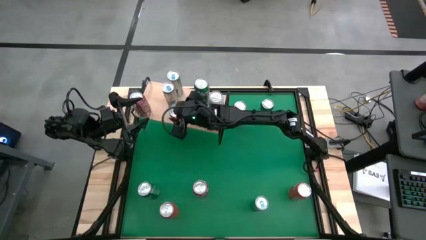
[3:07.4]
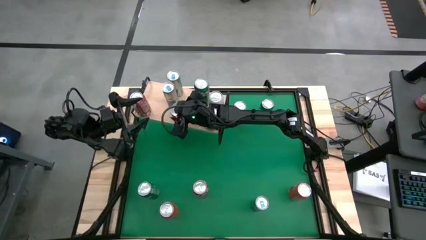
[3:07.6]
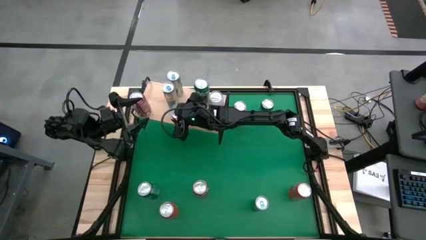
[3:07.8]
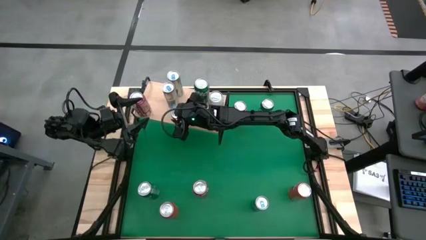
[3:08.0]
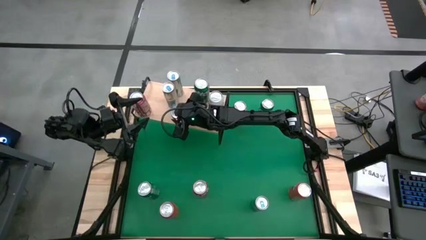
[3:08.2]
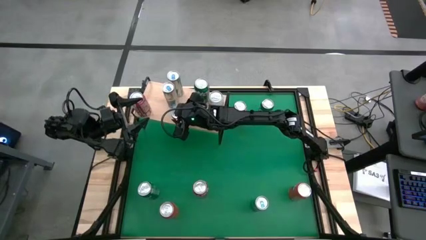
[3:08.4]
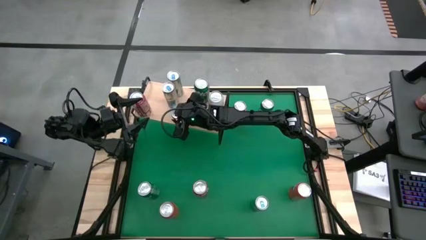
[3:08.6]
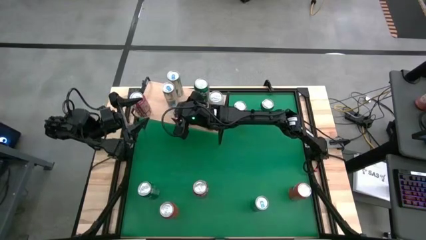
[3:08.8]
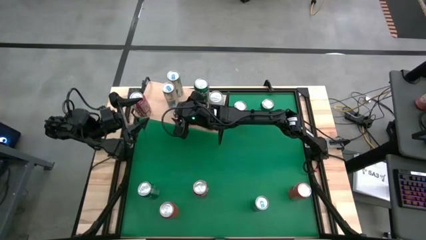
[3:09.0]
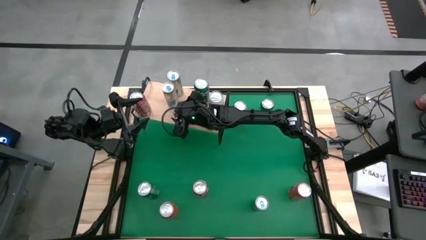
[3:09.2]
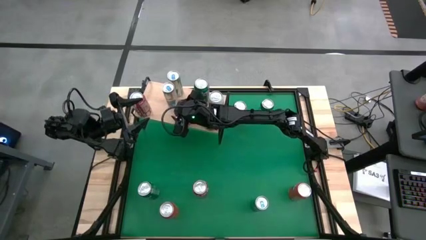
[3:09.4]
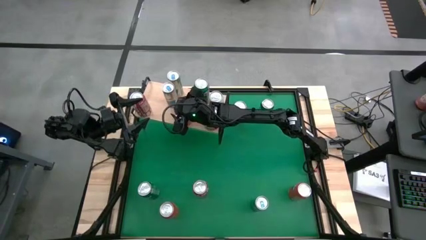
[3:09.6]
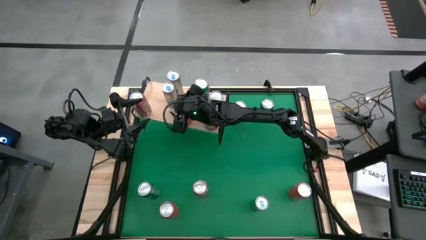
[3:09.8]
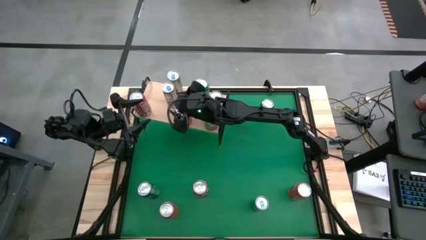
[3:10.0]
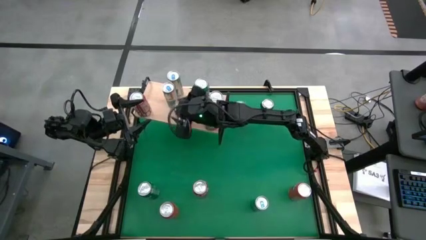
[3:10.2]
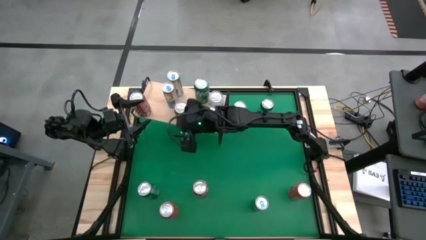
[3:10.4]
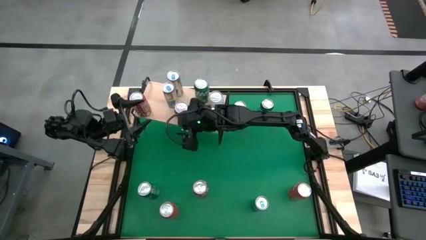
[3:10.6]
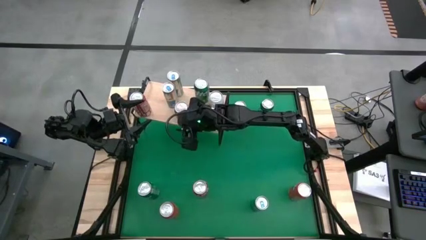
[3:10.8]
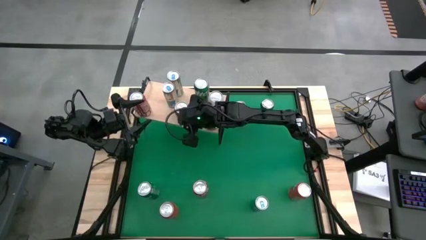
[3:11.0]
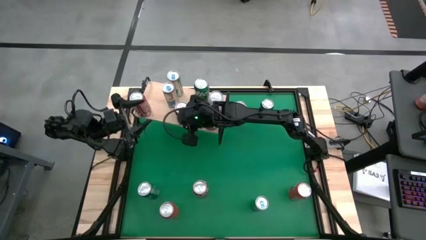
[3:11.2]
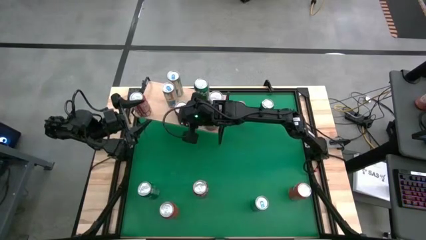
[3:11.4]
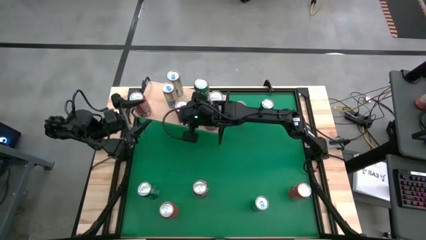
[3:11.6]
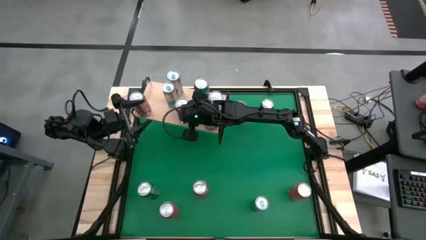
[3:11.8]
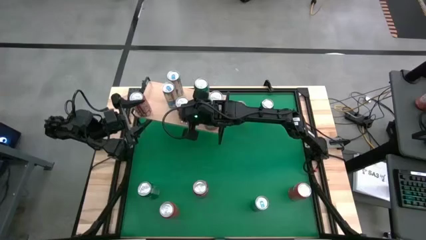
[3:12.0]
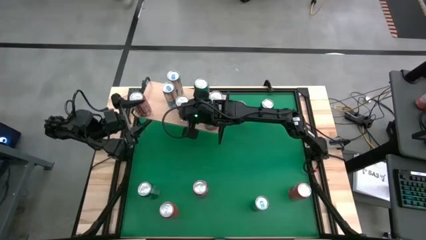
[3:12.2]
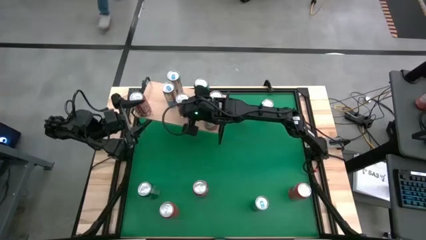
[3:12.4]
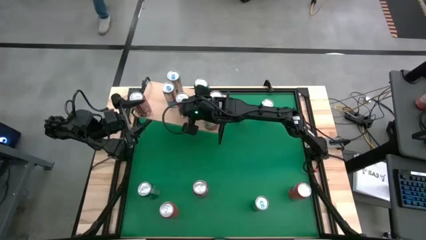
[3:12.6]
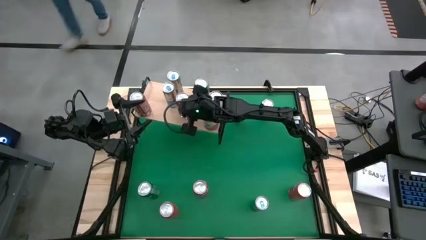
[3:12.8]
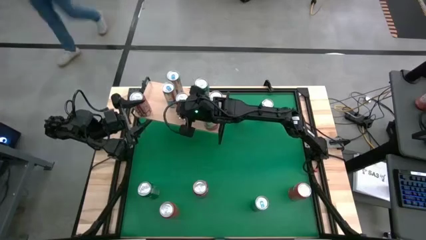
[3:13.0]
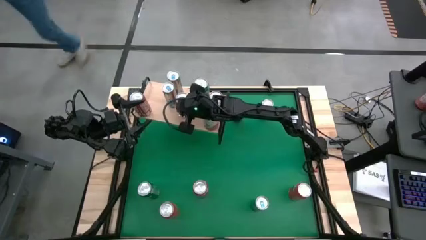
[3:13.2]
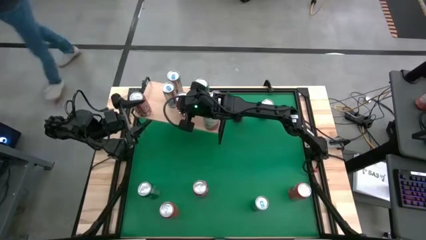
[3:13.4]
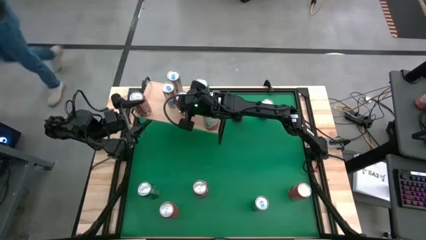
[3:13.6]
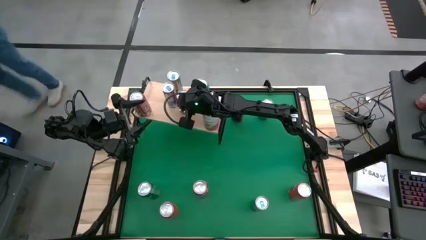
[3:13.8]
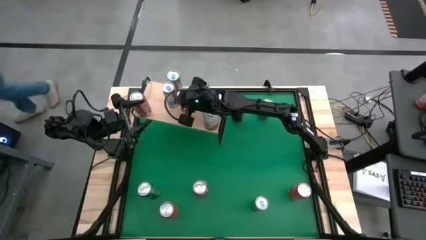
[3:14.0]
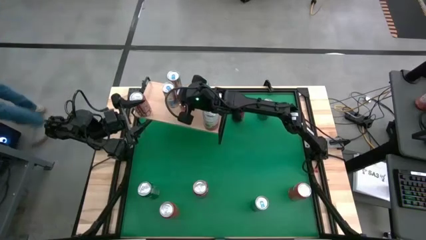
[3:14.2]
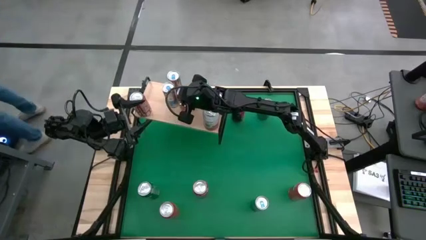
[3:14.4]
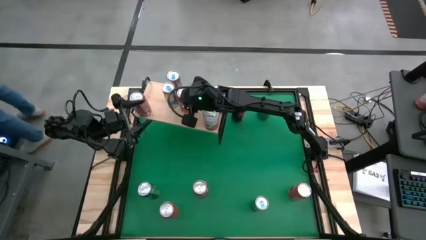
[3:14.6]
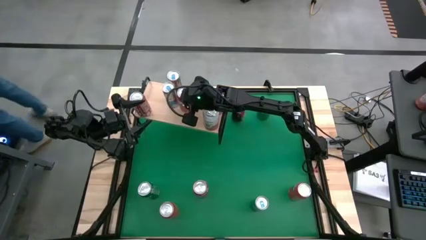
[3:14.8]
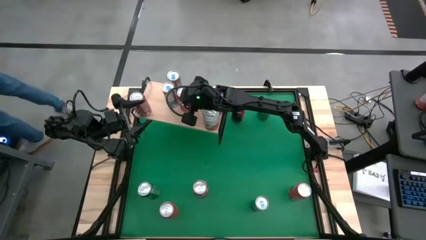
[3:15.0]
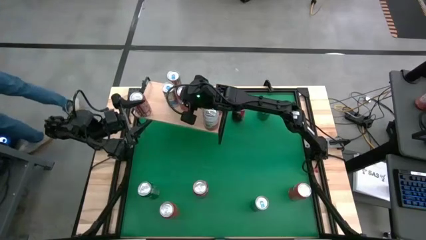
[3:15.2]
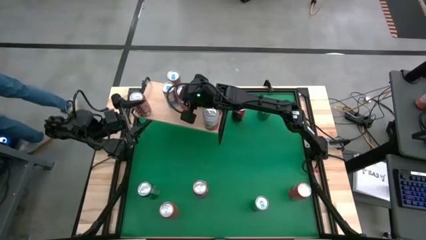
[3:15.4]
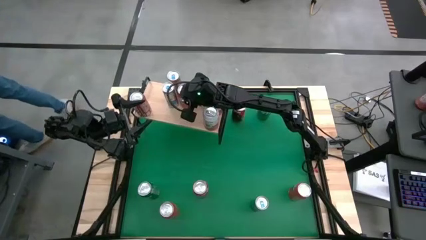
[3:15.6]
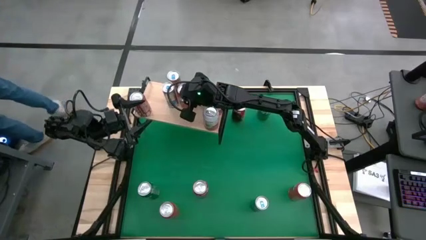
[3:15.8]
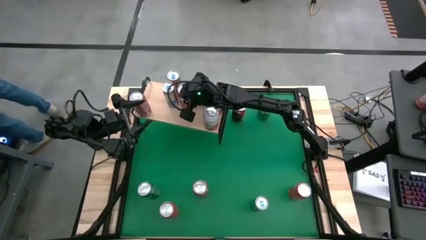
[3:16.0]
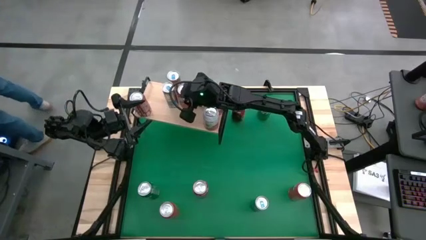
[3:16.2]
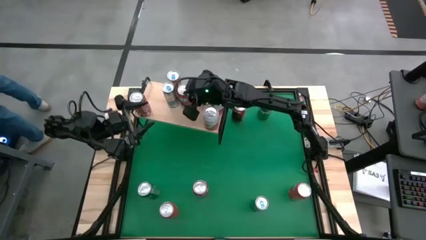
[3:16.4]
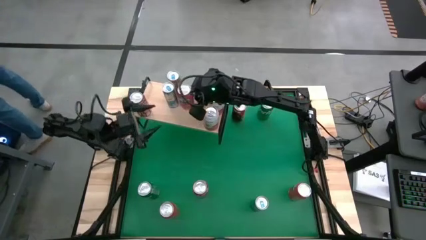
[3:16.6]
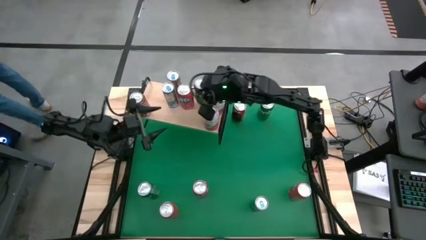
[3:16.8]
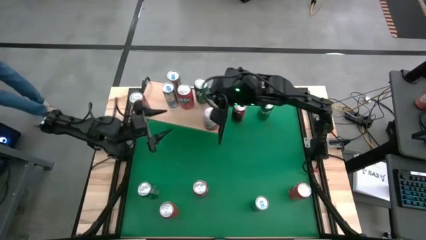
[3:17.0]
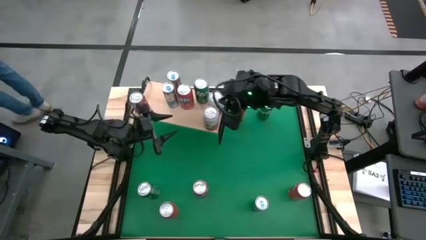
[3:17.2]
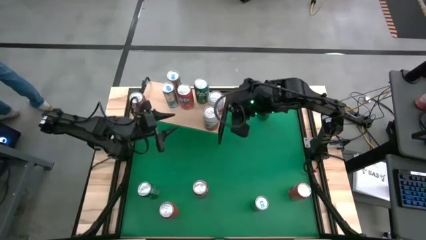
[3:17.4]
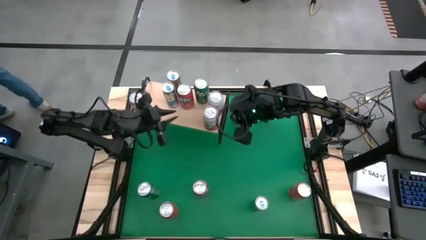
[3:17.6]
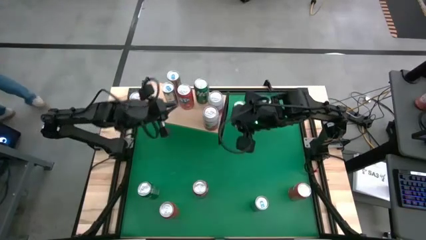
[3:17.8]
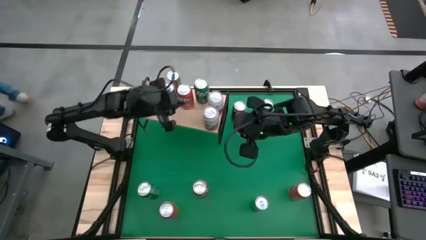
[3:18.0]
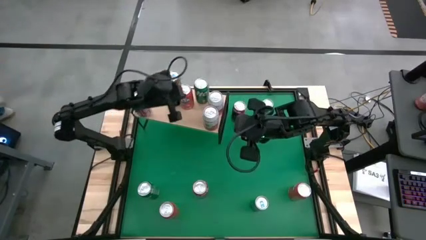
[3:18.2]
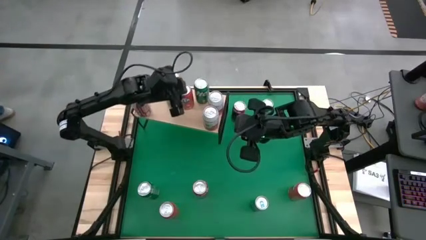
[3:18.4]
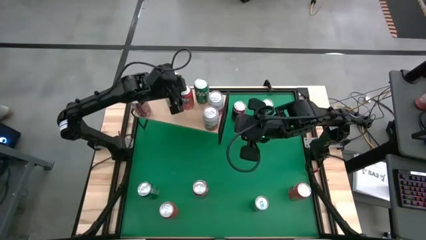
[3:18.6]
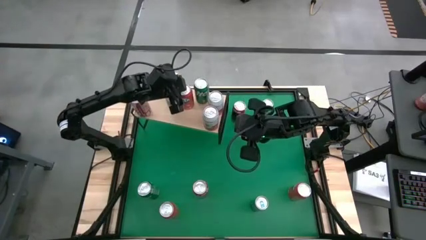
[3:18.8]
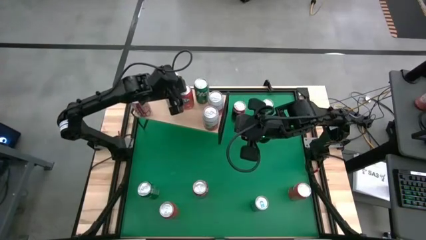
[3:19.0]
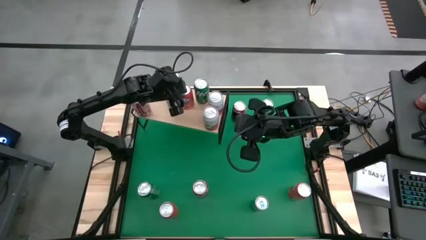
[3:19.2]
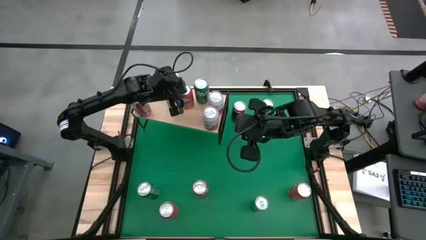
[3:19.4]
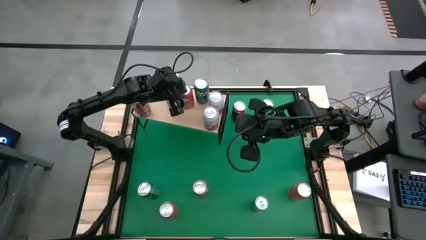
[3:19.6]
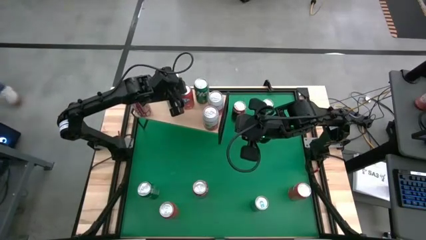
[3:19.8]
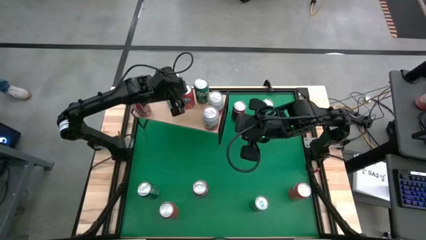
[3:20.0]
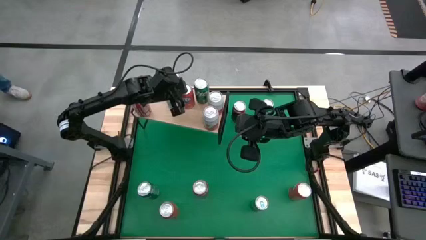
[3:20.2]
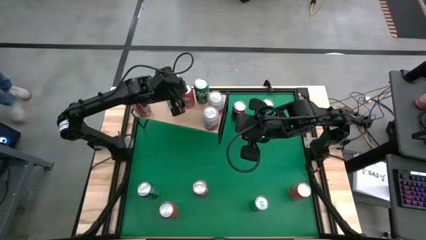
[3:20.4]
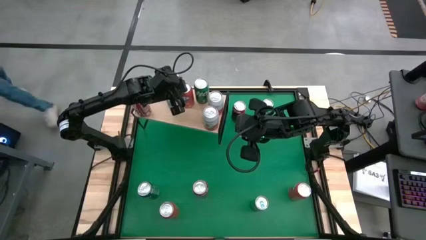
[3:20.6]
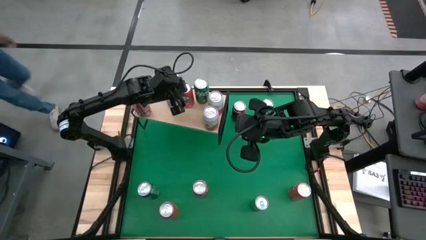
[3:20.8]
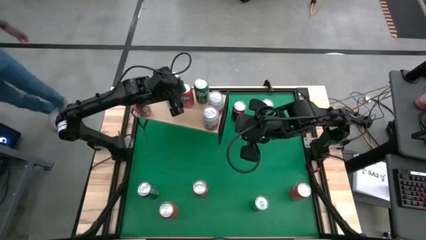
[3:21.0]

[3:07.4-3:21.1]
Task: Place canned beverage on shelf
Put the red soda can on the shelf

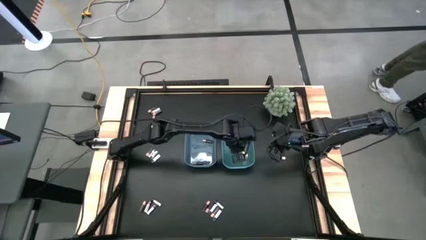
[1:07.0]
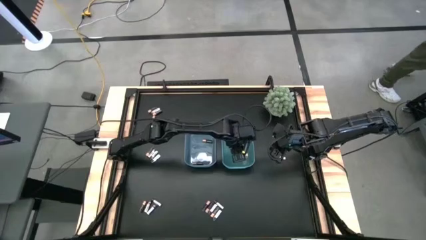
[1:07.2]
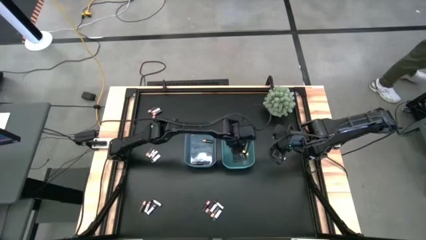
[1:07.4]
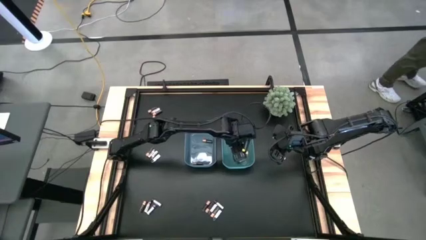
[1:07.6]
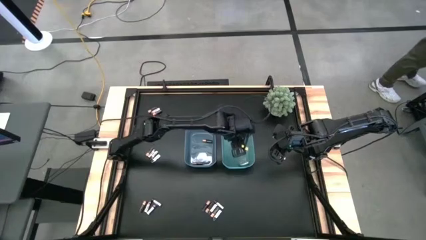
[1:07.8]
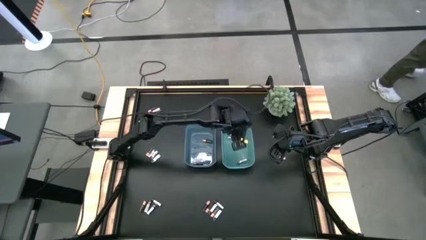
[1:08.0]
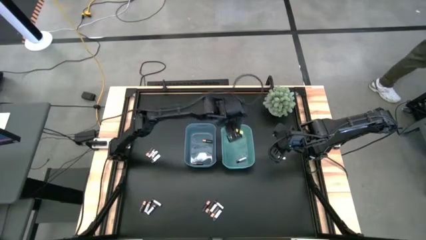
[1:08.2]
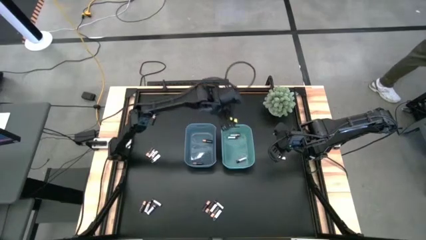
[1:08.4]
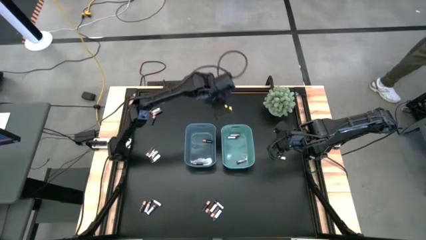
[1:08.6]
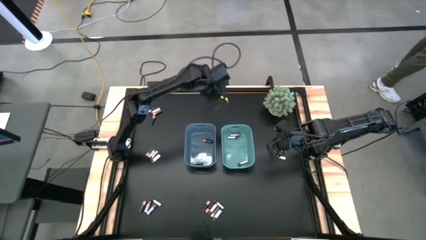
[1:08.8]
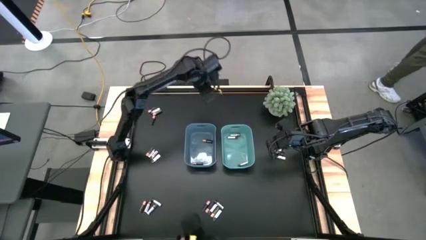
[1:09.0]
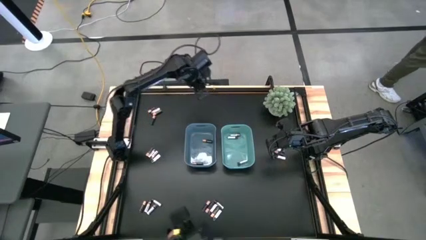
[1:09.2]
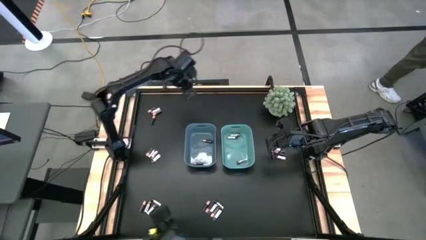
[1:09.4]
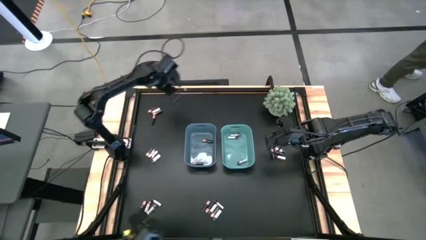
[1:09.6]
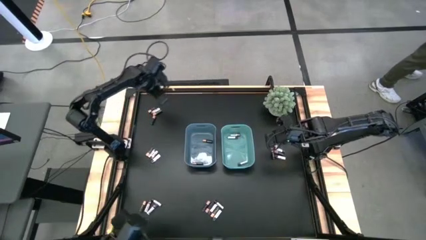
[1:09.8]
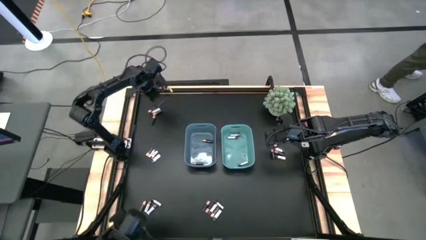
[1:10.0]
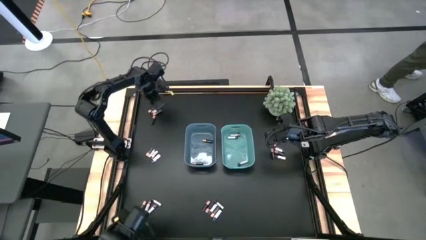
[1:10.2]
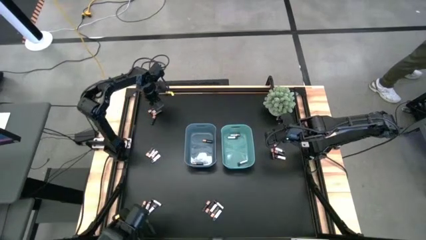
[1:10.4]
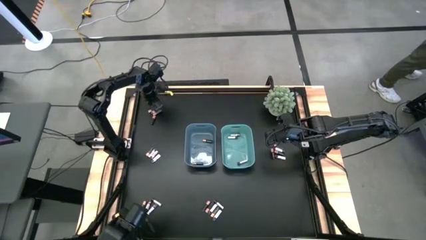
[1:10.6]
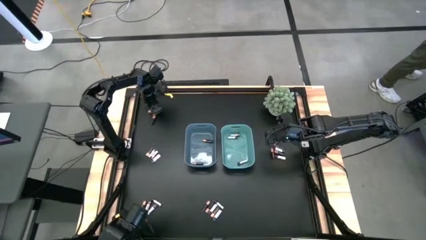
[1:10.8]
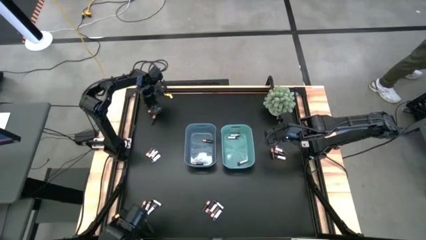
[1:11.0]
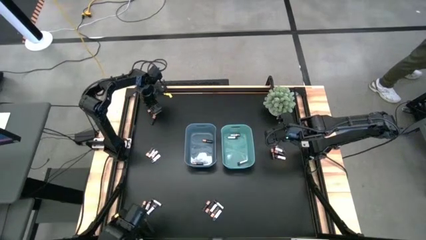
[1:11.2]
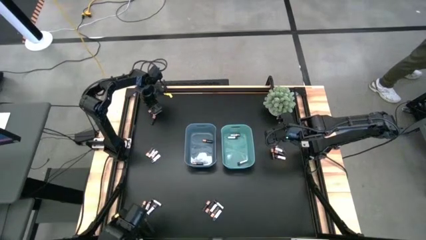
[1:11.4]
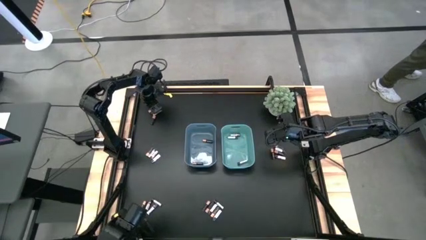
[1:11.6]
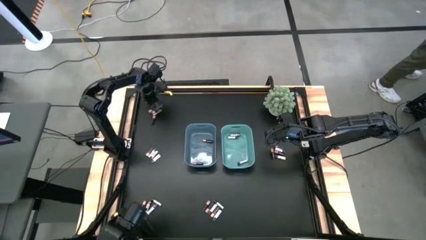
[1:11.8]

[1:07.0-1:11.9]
Task: Sort batteries
Put the black battery into the blue bin
